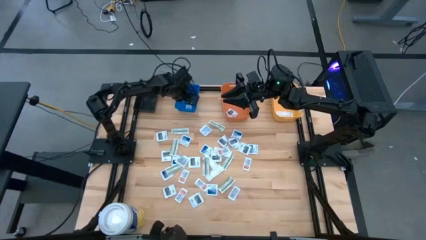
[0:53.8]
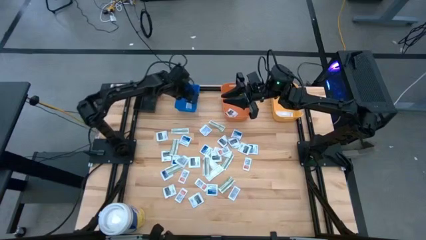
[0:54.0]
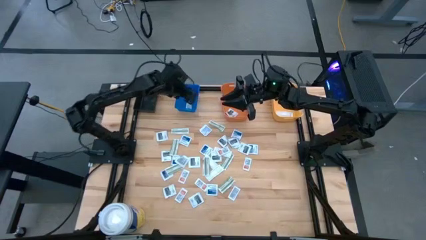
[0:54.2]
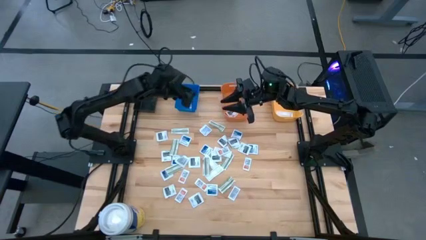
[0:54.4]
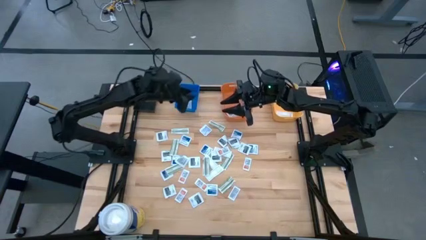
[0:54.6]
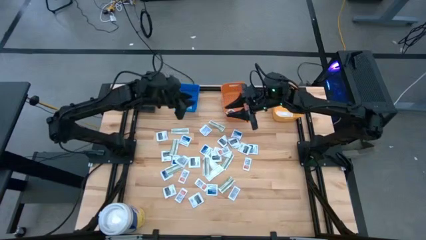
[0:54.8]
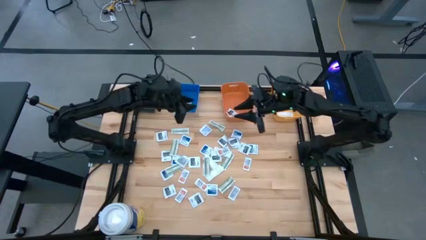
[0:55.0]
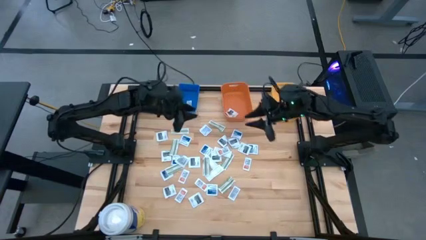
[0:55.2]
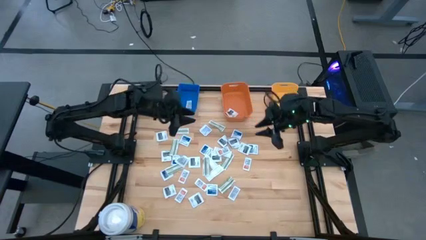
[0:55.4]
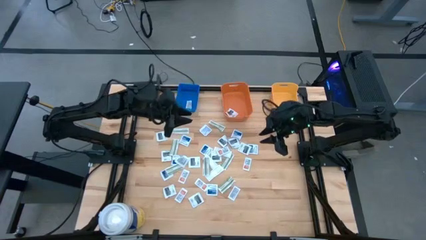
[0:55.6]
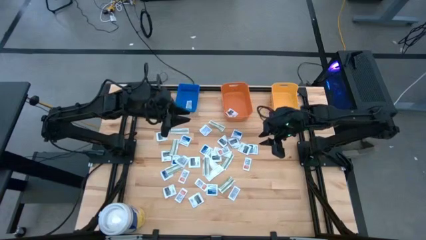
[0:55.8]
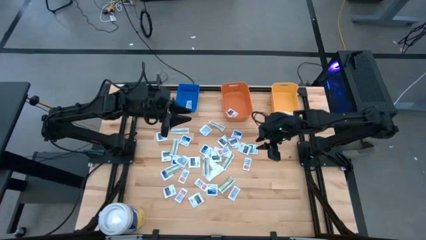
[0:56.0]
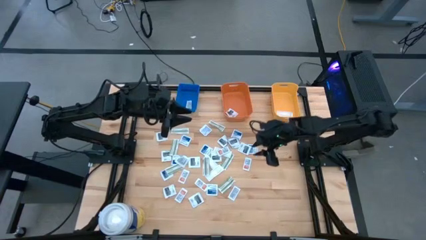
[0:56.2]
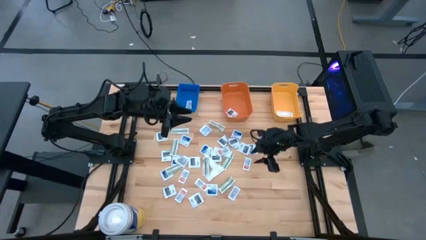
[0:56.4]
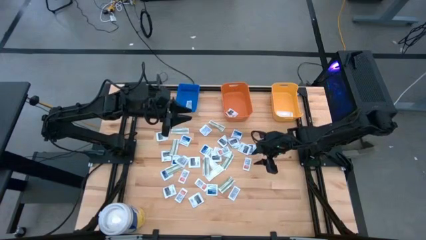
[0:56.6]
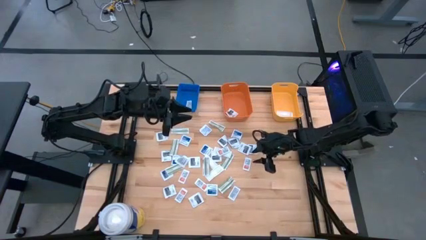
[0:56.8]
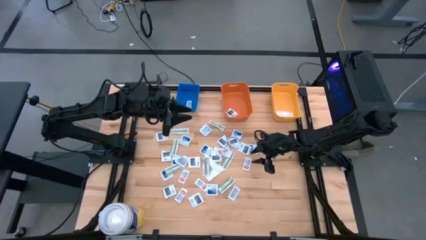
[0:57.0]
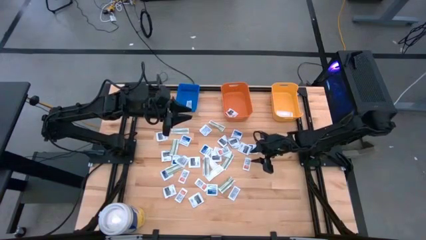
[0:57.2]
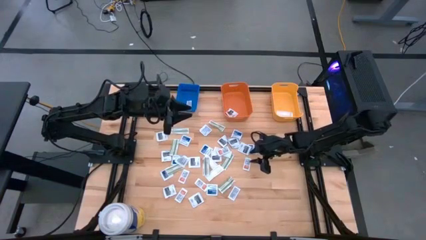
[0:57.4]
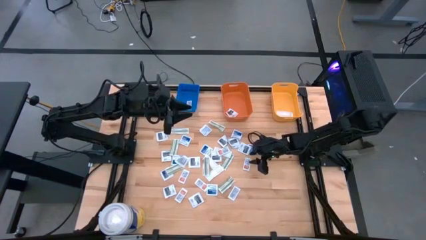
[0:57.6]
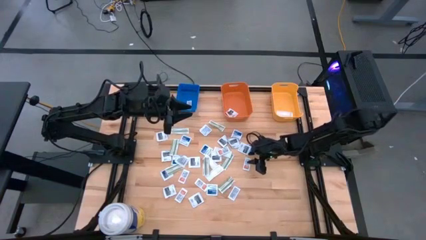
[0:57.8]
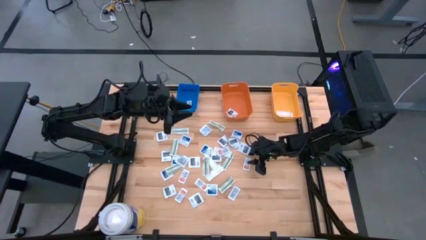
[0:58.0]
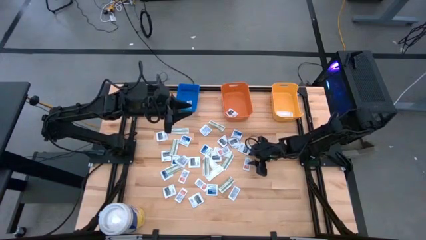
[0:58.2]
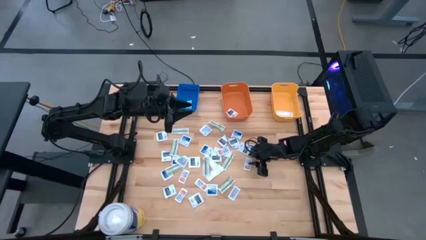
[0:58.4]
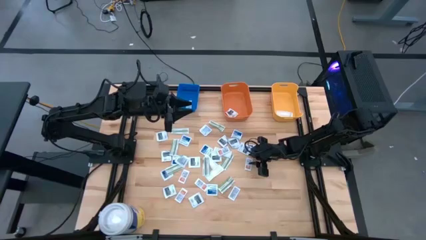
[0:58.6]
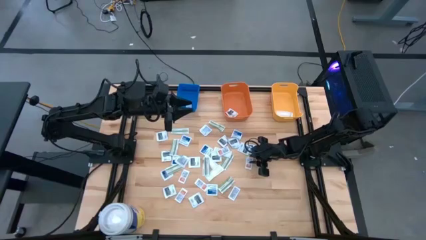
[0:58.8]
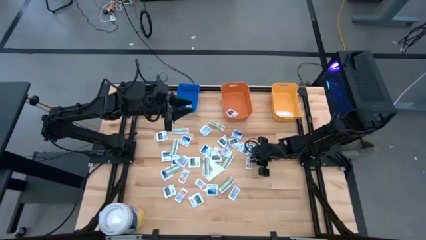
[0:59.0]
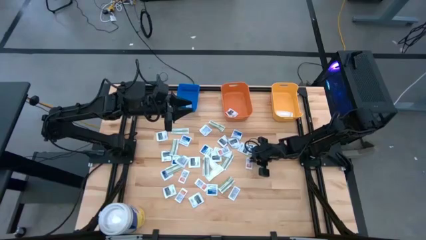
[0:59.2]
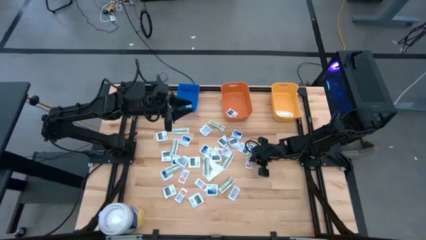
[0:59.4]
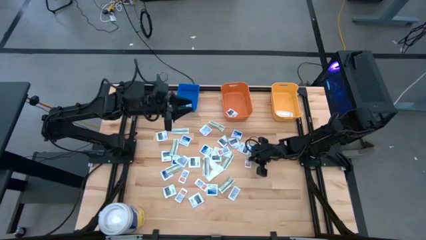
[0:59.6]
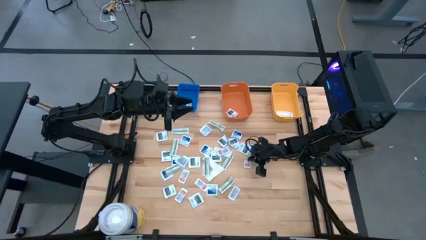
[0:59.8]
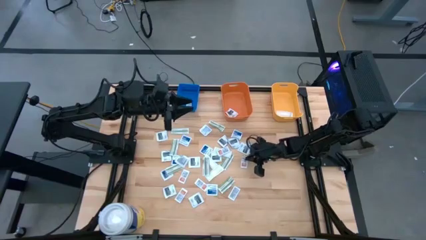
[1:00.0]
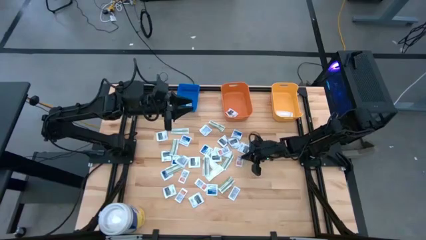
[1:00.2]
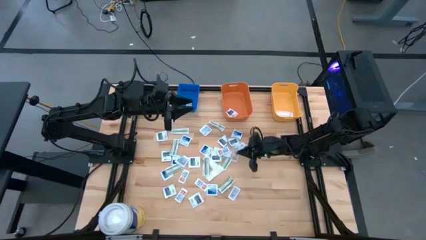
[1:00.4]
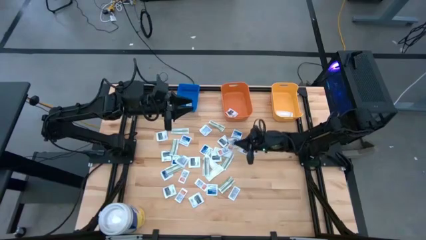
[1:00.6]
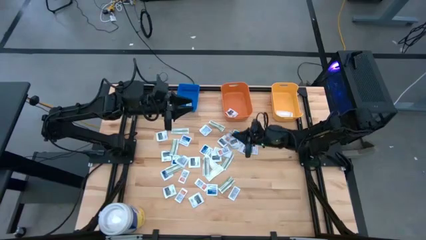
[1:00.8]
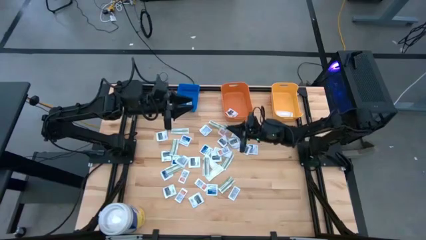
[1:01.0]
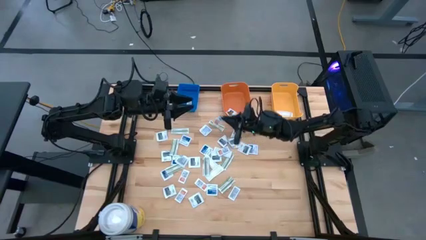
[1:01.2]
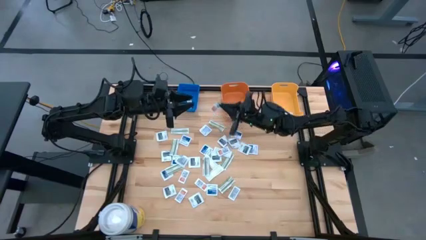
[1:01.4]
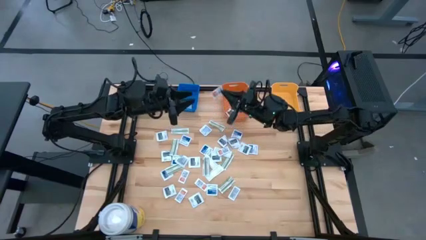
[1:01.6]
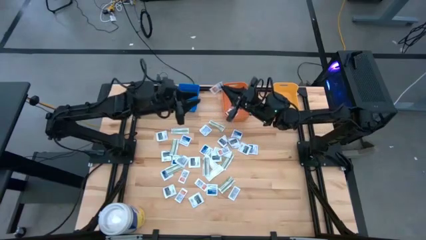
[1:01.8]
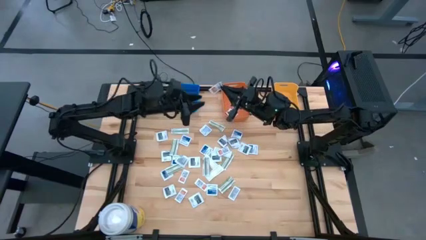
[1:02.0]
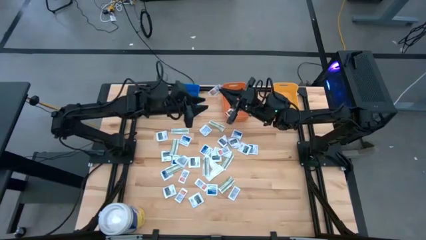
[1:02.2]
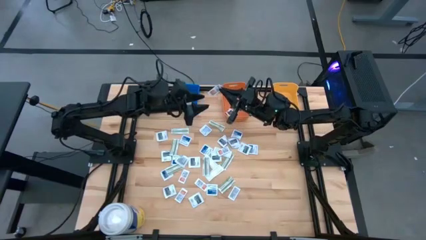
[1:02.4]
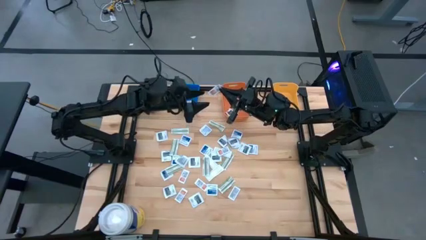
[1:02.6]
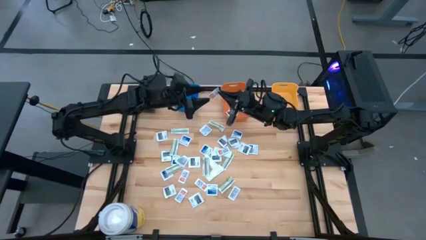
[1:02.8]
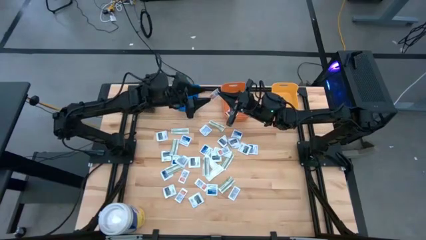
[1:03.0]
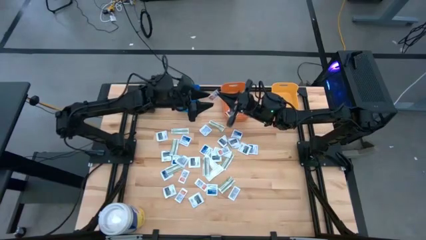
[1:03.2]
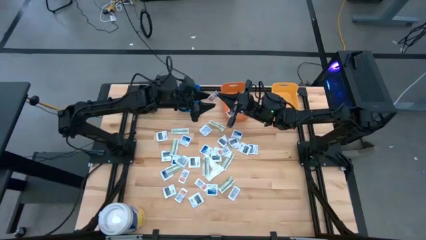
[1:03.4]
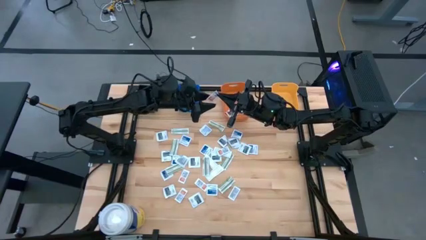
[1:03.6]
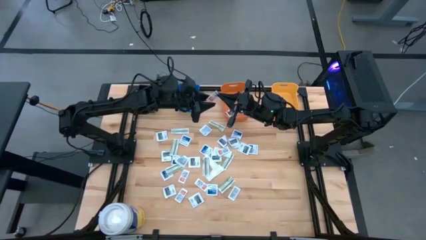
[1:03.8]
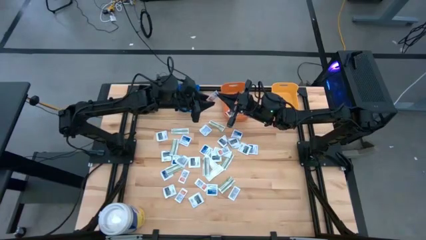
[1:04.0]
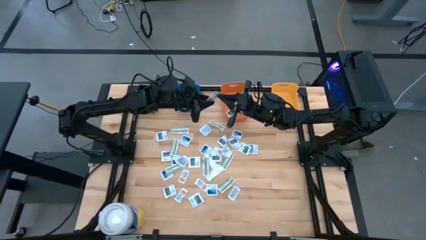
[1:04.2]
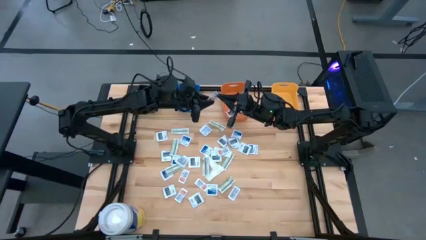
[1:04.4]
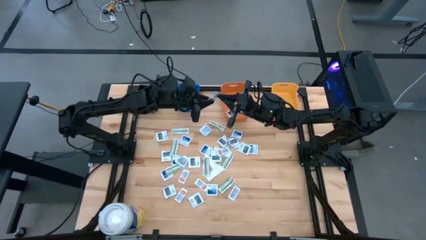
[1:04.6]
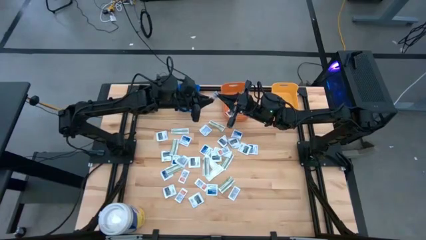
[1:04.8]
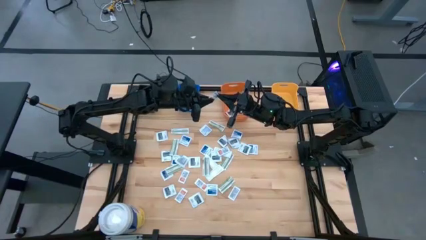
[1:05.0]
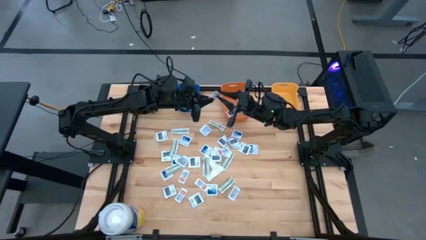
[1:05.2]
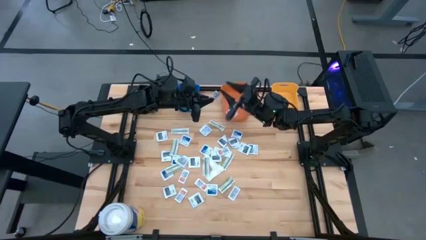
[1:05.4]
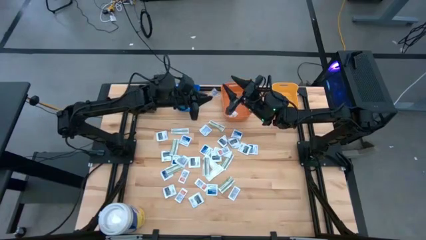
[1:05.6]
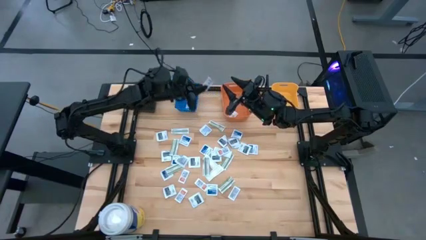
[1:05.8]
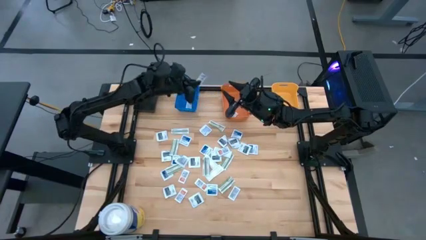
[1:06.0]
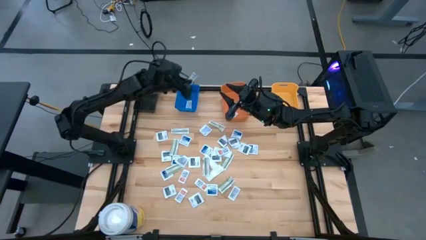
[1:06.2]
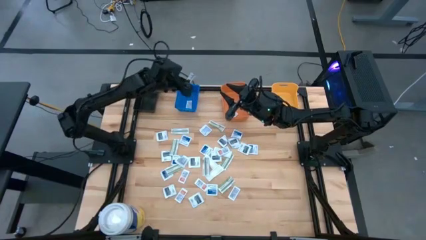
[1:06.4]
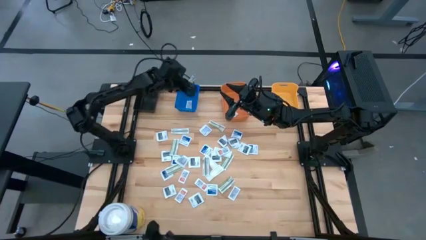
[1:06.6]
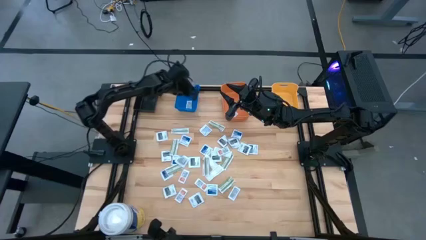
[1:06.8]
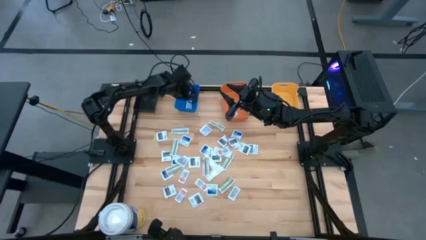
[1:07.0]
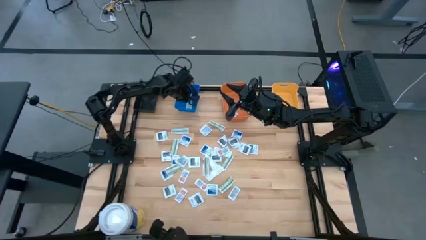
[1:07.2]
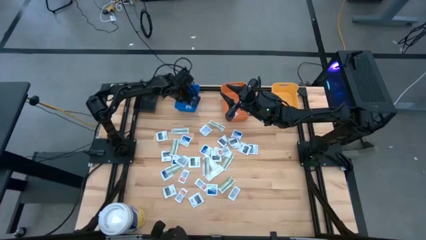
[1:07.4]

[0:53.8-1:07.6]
Task: Pick & Place First Aid Supplies
Put the ointment pack into the blue bin

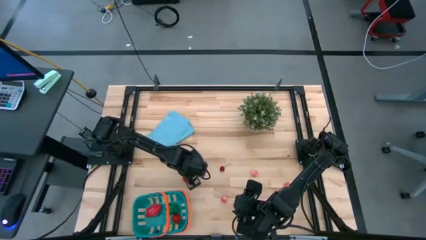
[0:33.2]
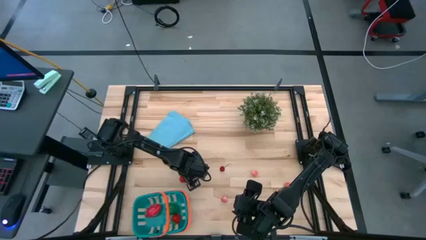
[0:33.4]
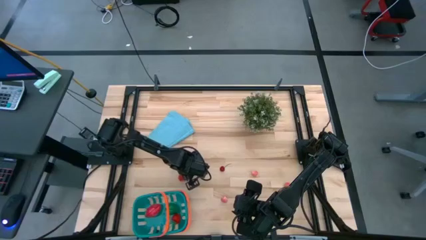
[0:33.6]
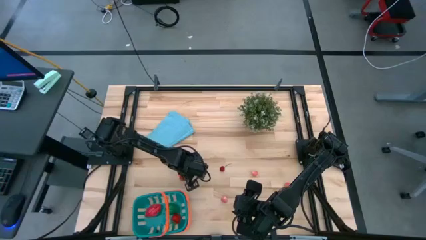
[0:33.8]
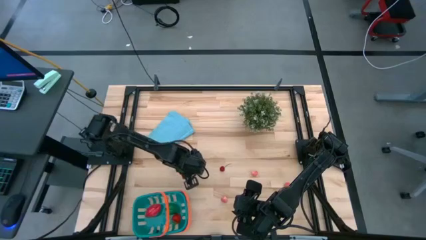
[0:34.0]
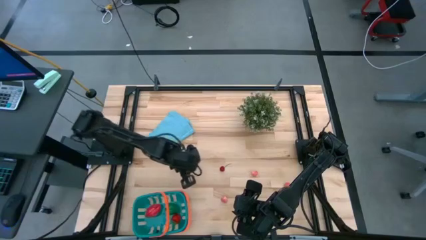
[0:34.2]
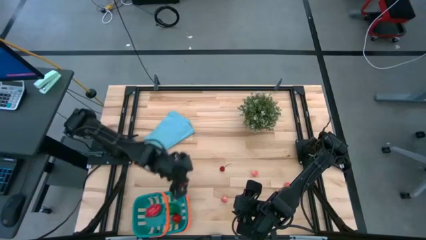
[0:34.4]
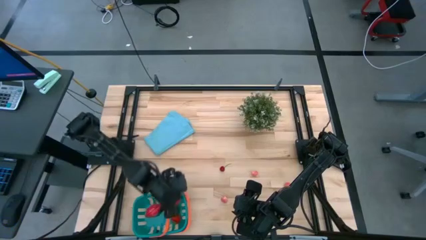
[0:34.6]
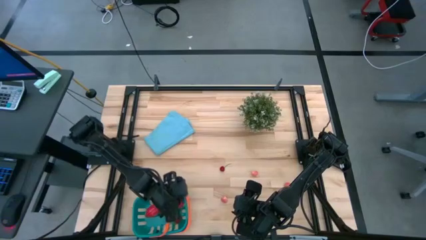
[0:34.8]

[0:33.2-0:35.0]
Task: Pick and placing Produce into tupperware
Put the red strawberry into the blue basket

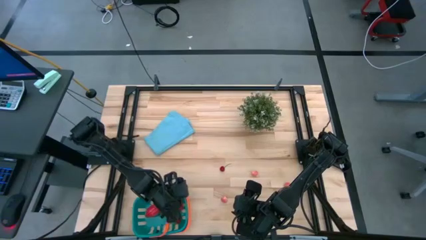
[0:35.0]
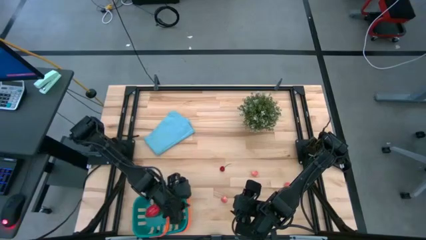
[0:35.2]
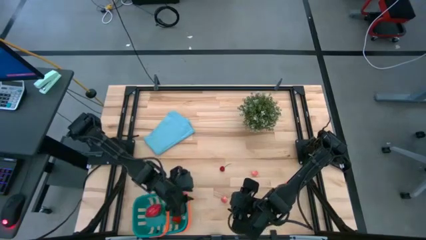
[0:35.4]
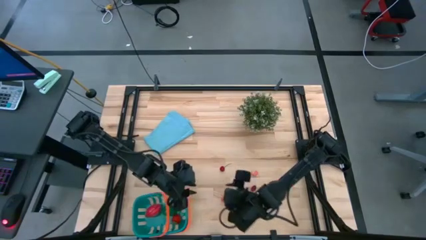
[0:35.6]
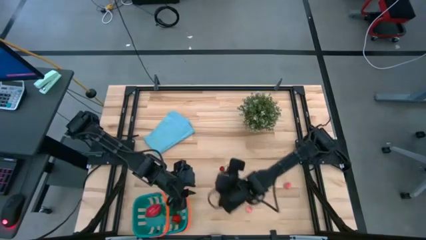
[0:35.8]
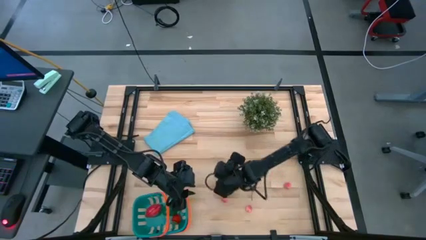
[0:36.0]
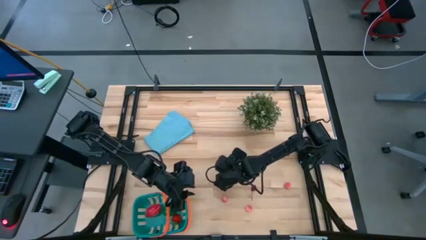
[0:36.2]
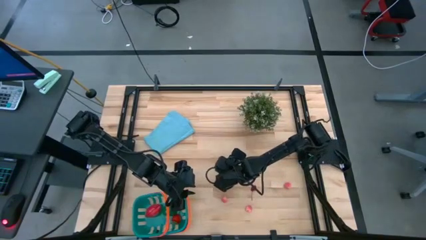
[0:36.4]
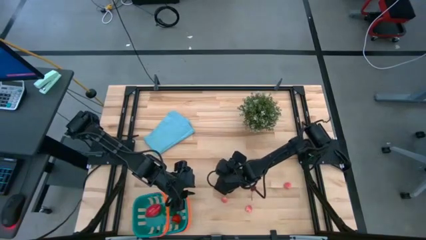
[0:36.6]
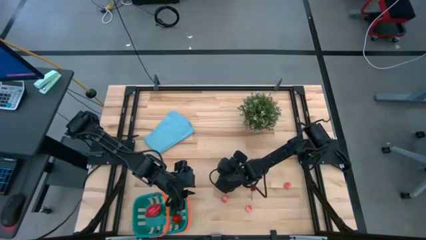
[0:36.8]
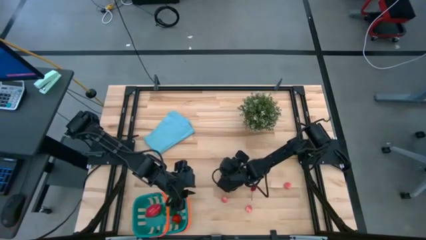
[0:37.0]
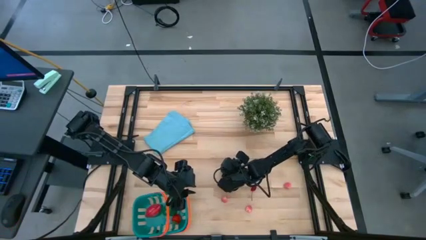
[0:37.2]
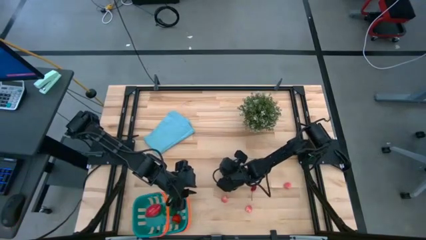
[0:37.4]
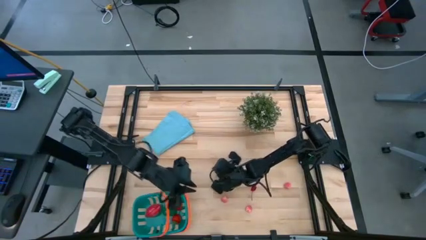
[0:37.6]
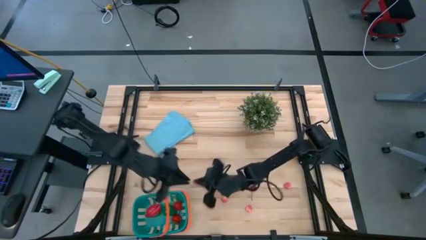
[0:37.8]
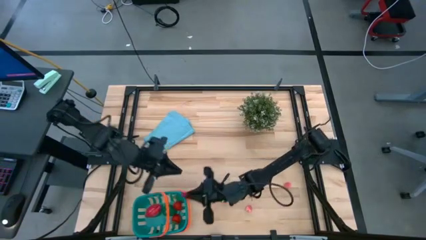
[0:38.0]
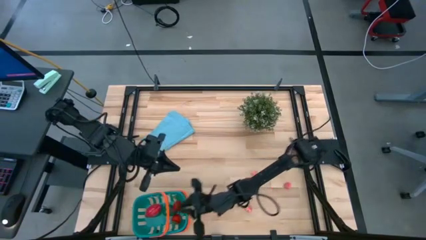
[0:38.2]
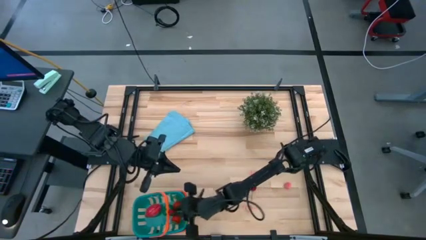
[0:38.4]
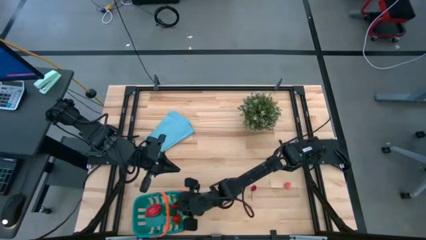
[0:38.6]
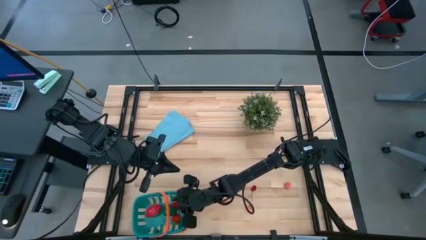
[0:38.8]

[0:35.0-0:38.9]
Put the red cherry into the blue basket
